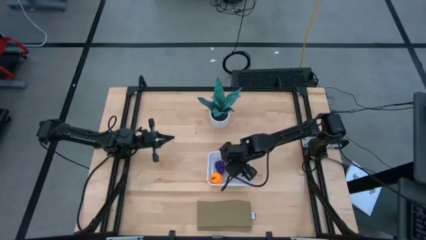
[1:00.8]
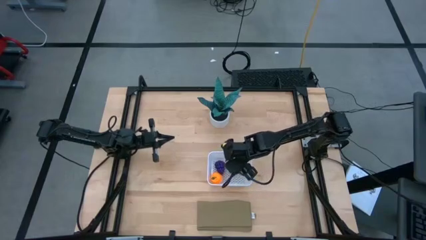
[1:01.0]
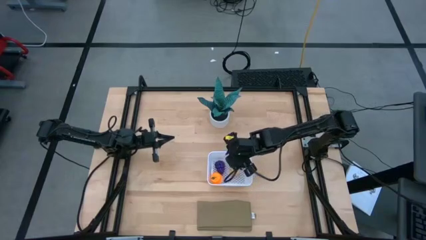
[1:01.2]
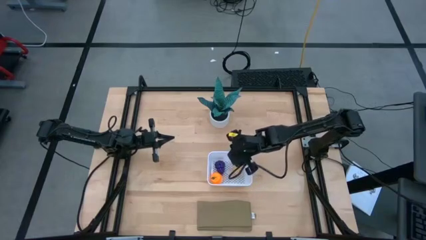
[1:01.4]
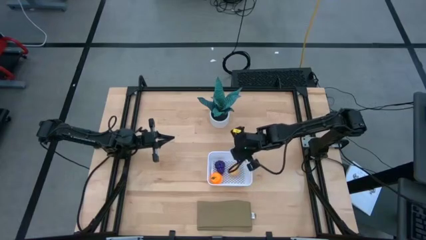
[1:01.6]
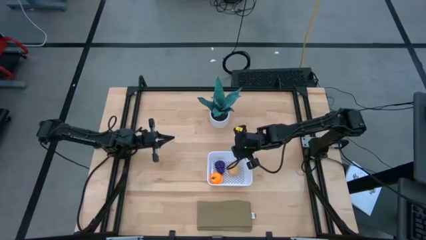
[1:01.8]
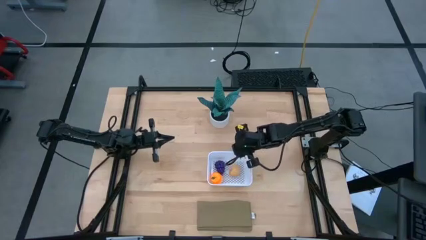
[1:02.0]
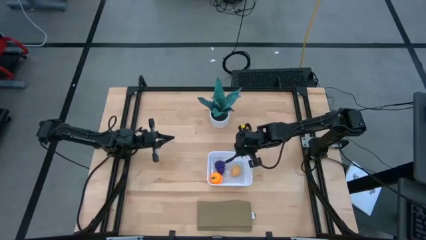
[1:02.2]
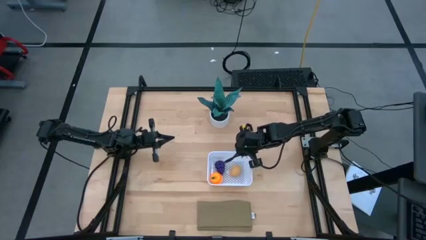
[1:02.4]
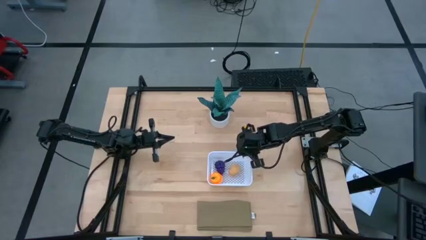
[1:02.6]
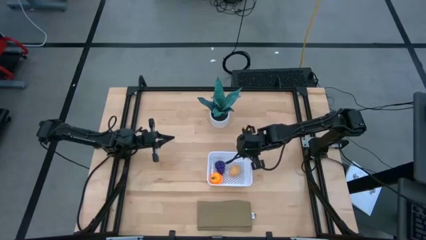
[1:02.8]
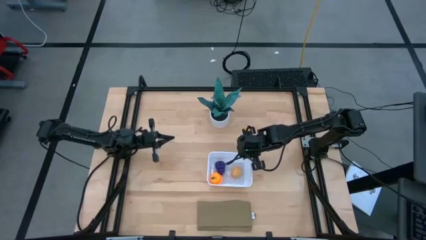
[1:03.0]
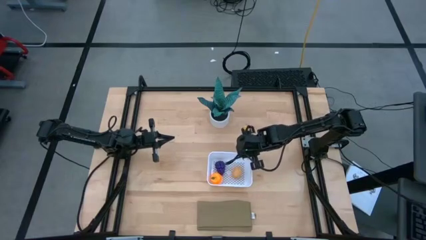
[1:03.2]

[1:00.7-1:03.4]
Task: Pick and placing Produce into tupperware
Adjust the white basket

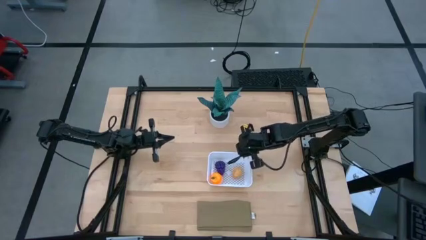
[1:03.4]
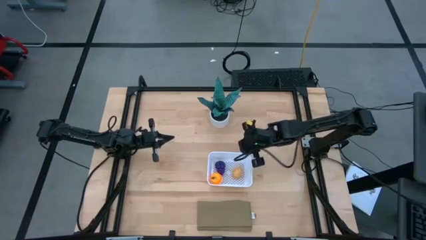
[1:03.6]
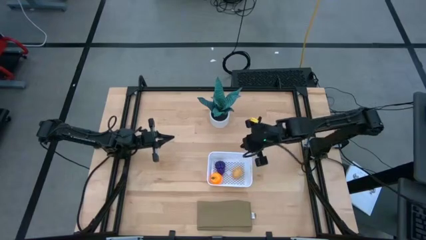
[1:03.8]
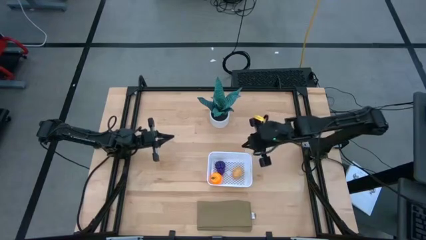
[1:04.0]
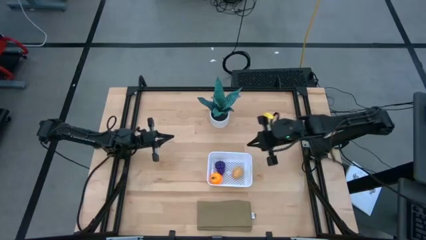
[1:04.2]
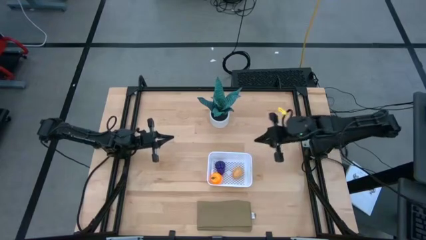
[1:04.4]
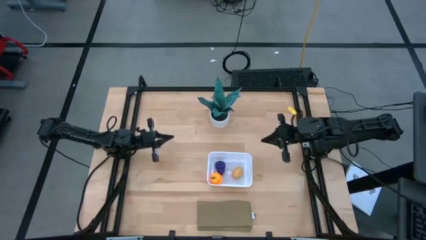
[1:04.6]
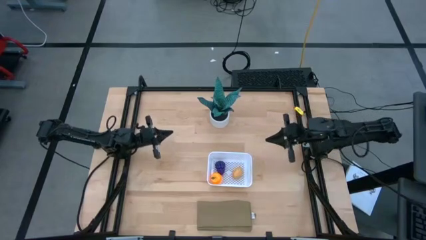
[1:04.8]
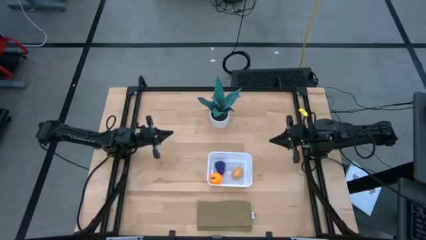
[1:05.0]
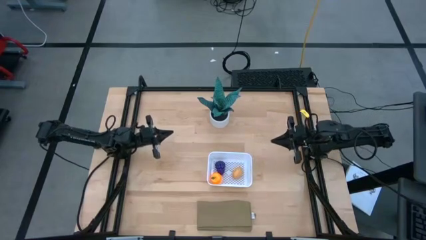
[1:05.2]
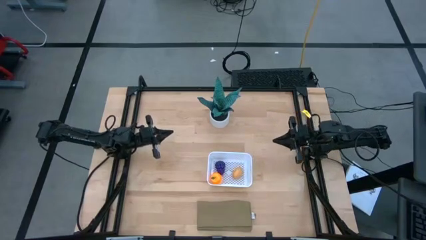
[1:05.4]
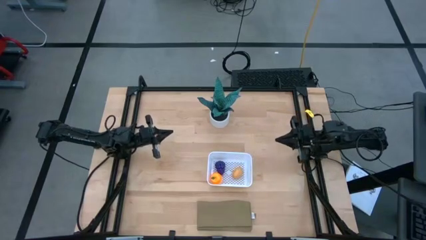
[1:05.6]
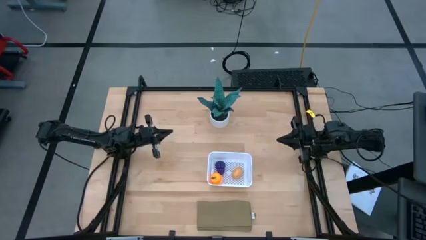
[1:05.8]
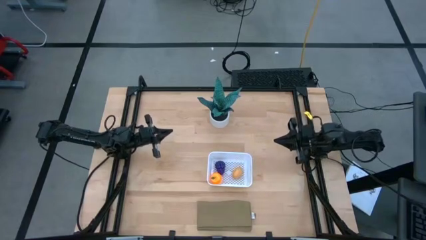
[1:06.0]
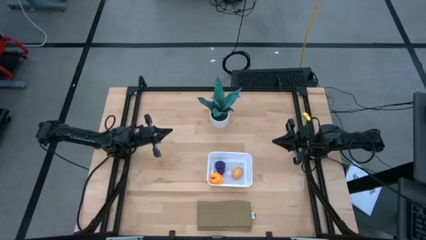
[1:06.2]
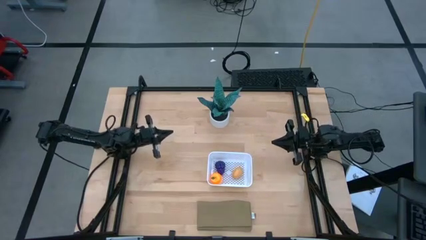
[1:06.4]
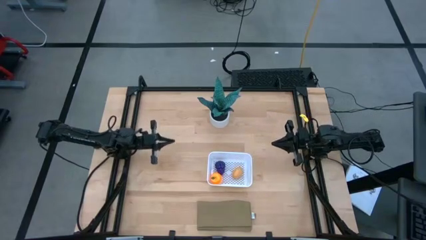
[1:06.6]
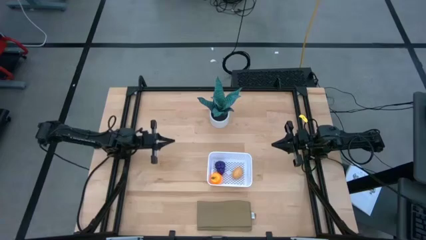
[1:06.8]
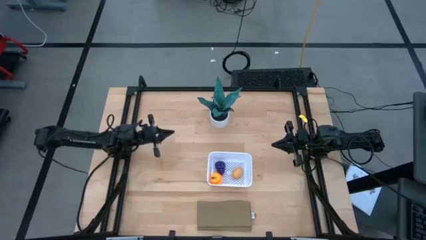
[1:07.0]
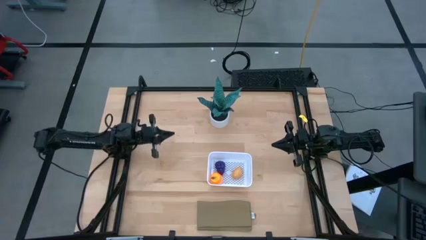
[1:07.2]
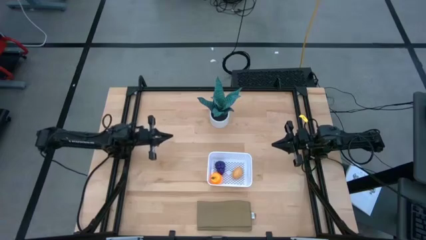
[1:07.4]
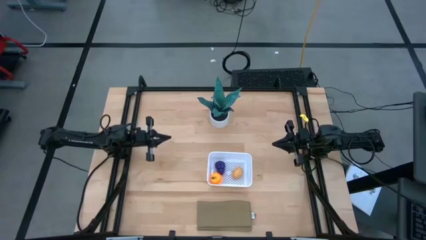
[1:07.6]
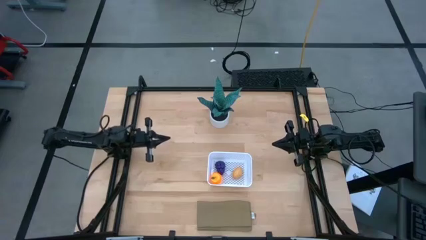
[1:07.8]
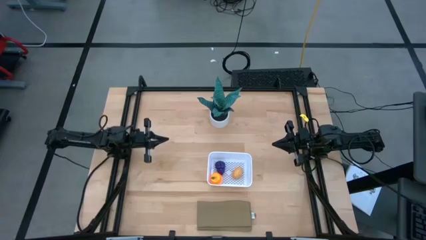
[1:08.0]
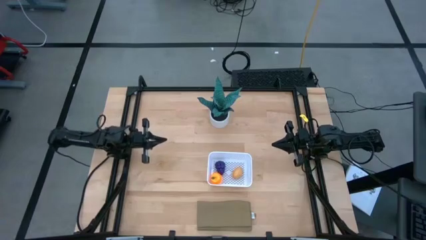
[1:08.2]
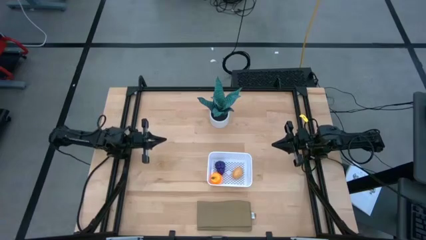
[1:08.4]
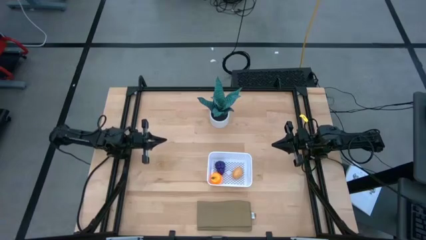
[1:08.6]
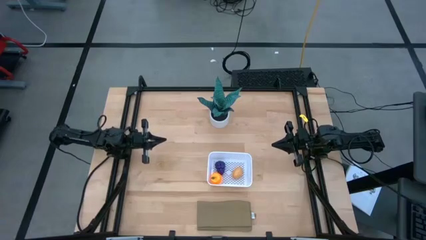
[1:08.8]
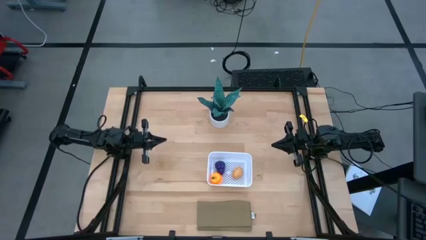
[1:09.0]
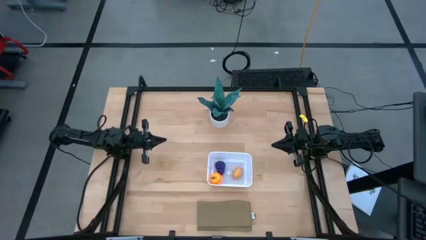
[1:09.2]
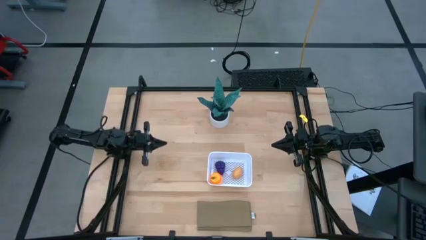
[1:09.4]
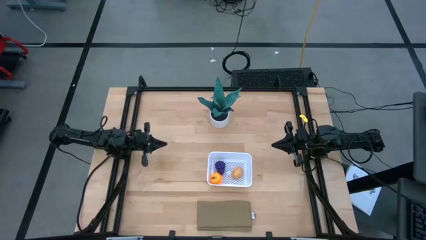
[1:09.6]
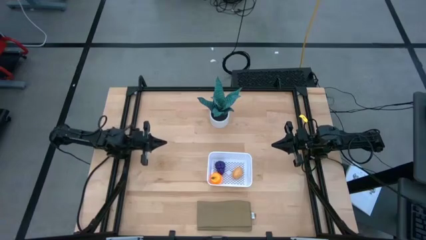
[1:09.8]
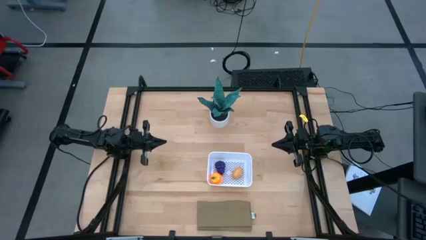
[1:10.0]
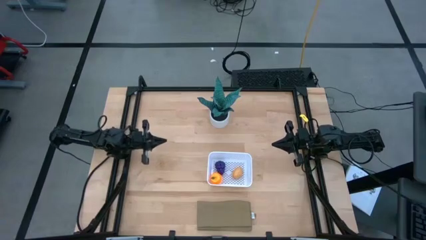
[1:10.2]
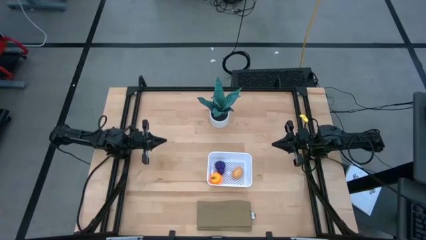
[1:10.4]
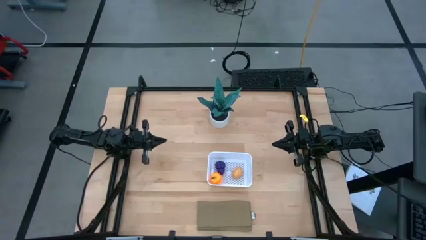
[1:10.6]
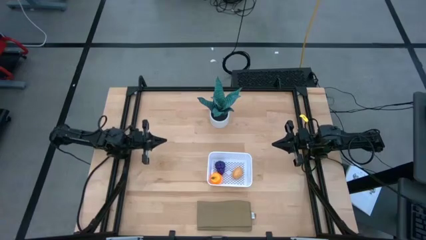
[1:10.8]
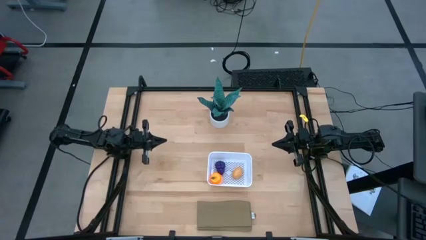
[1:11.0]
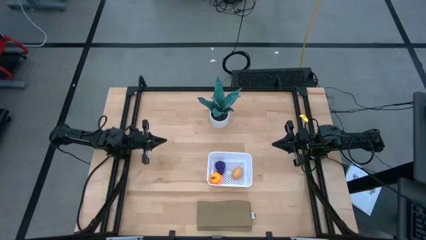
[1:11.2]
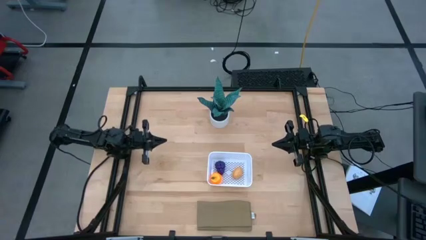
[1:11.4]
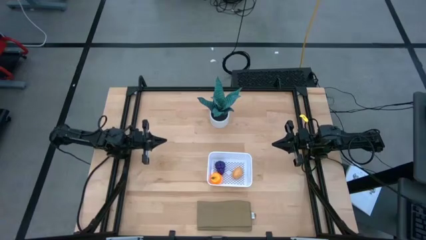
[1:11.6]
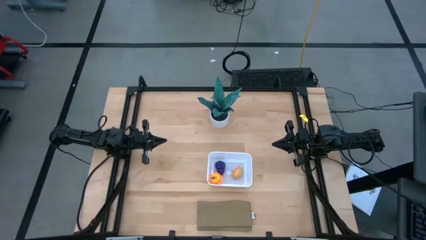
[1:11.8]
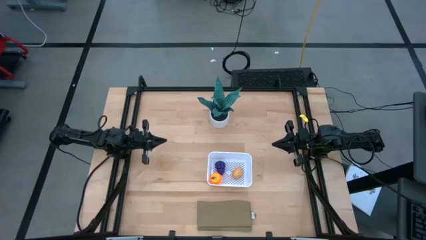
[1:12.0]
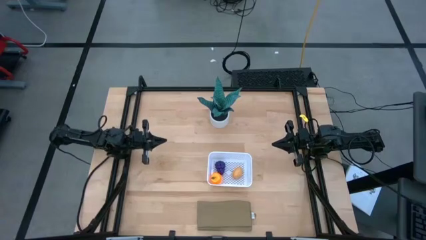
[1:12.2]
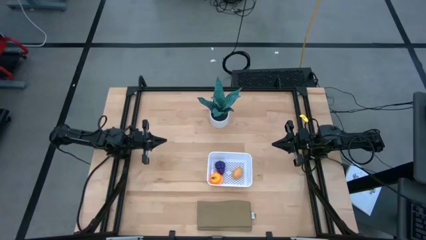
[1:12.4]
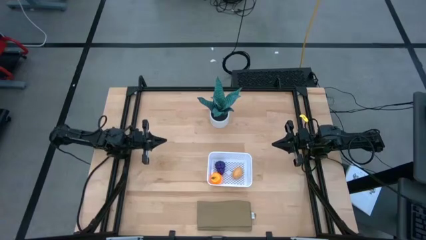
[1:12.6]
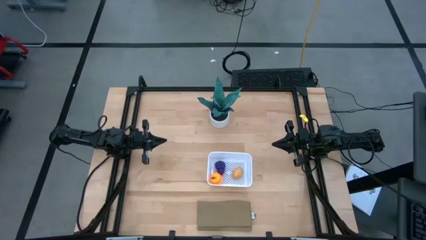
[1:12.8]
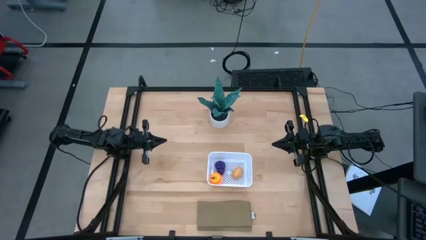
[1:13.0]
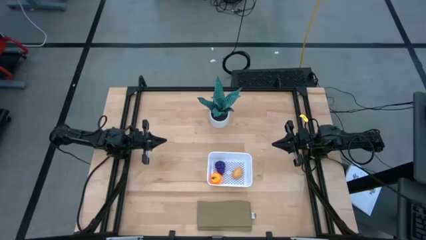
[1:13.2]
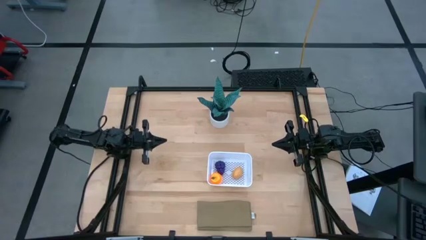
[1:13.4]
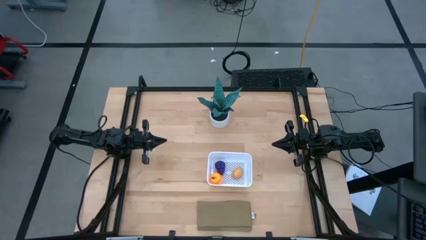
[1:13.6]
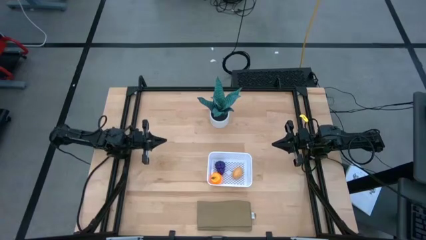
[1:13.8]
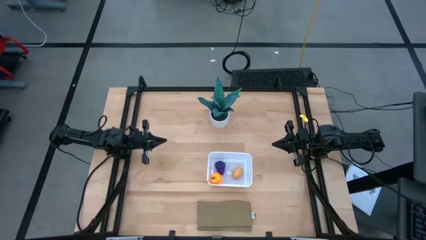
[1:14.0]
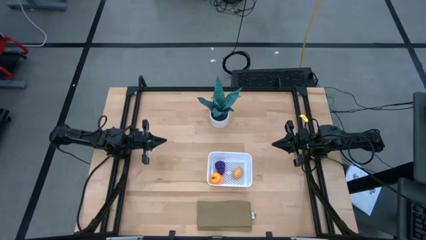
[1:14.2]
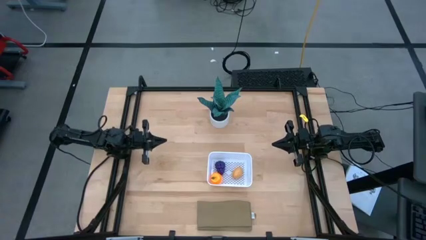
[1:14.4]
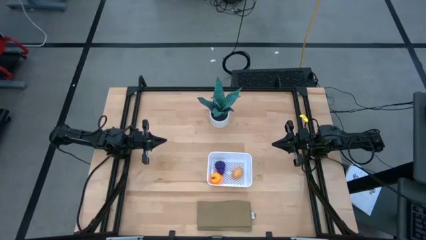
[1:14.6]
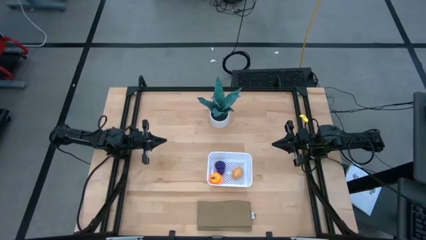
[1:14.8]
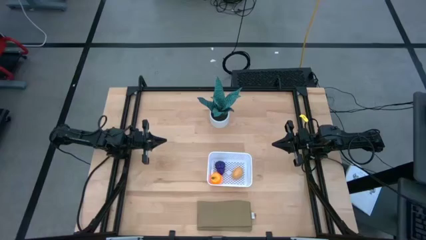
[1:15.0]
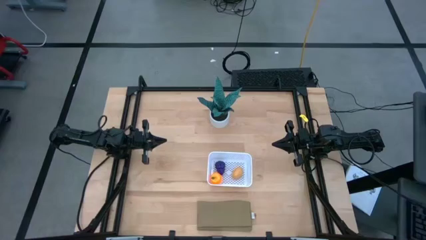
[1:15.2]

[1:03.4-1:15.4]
Return to Home Position
